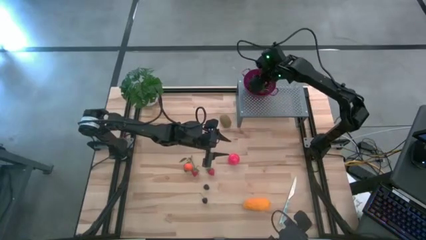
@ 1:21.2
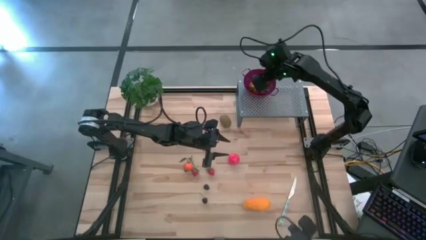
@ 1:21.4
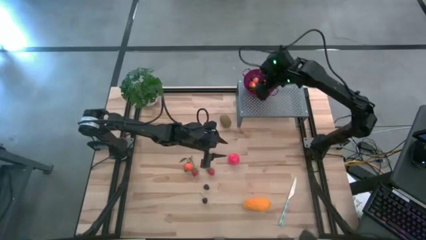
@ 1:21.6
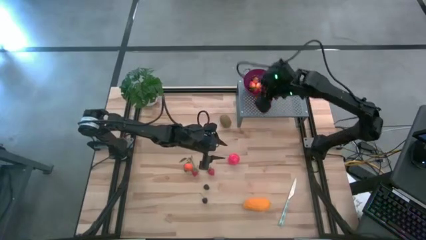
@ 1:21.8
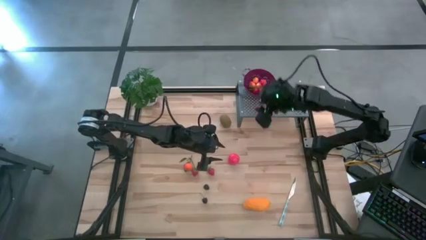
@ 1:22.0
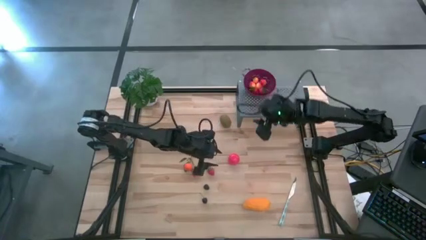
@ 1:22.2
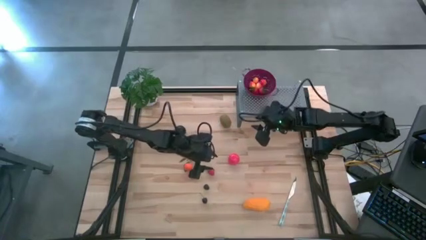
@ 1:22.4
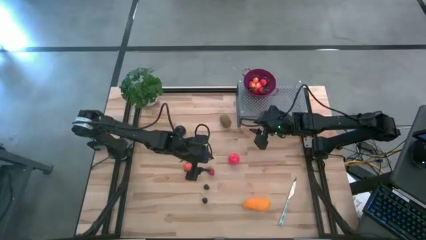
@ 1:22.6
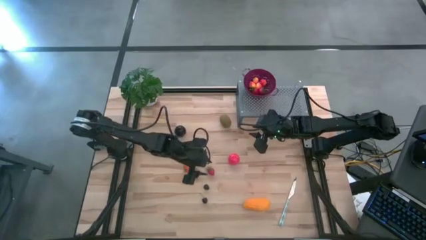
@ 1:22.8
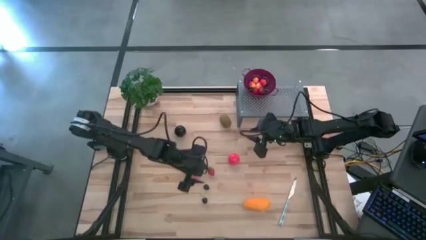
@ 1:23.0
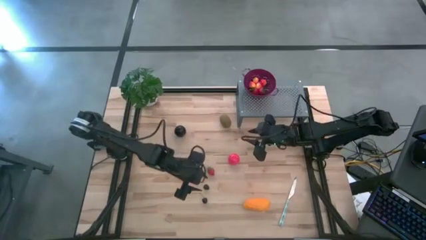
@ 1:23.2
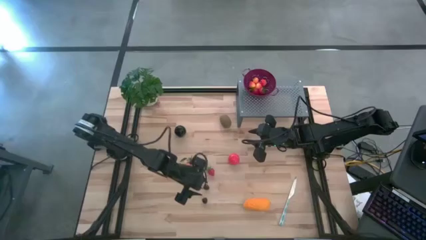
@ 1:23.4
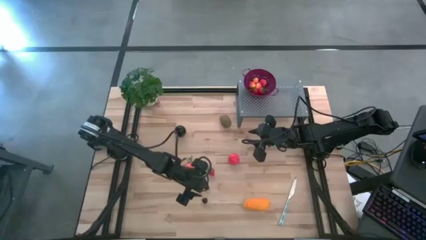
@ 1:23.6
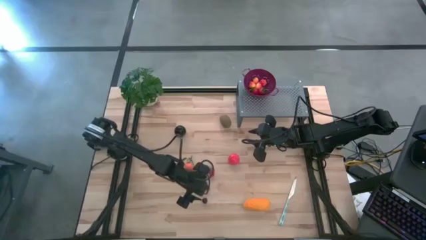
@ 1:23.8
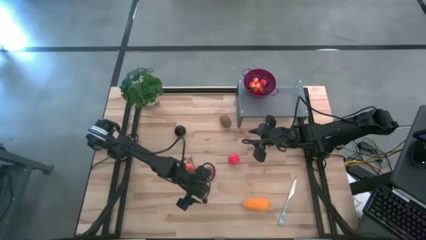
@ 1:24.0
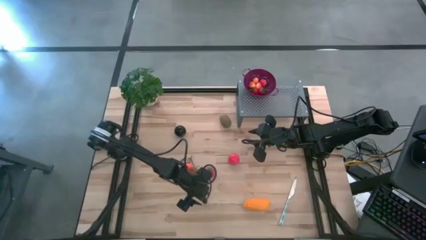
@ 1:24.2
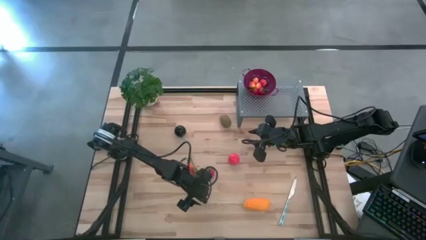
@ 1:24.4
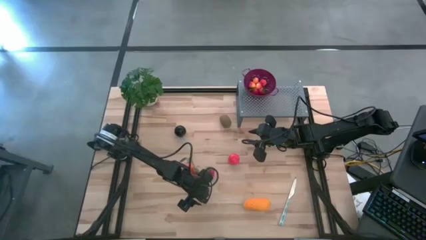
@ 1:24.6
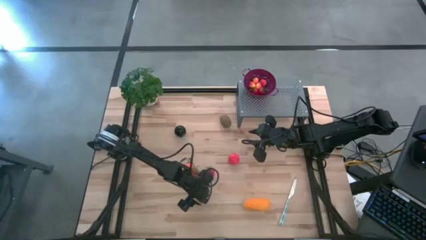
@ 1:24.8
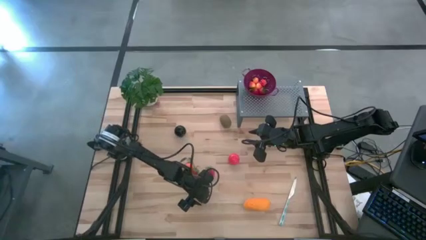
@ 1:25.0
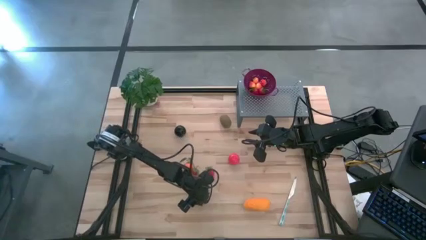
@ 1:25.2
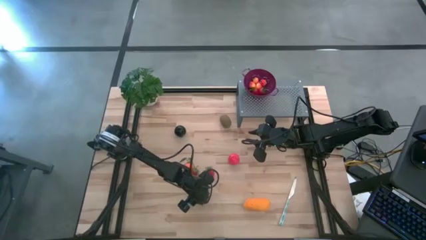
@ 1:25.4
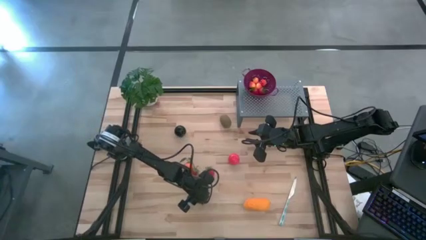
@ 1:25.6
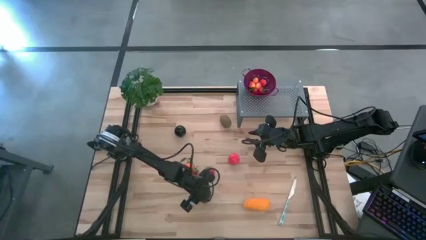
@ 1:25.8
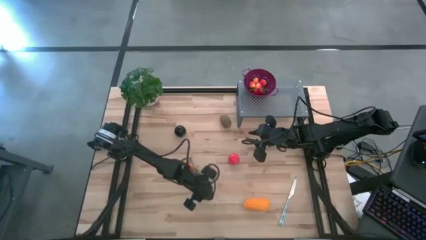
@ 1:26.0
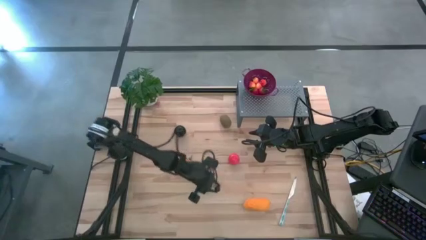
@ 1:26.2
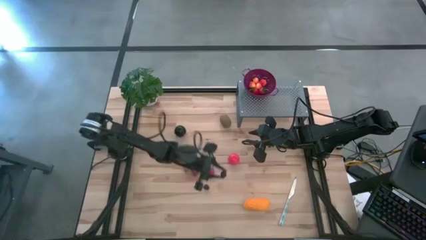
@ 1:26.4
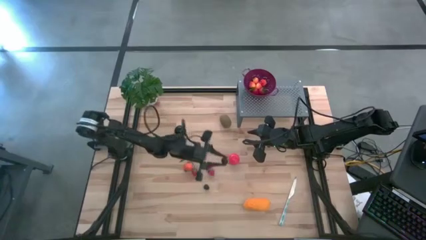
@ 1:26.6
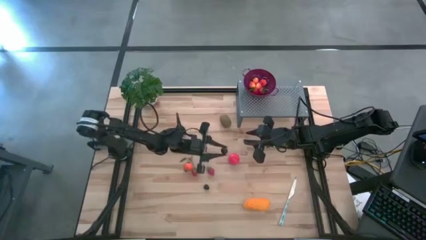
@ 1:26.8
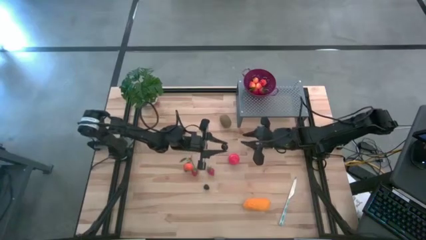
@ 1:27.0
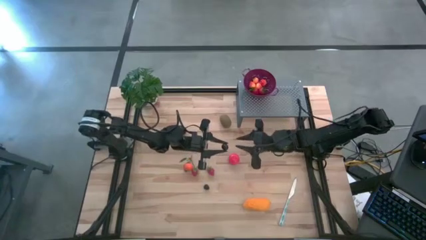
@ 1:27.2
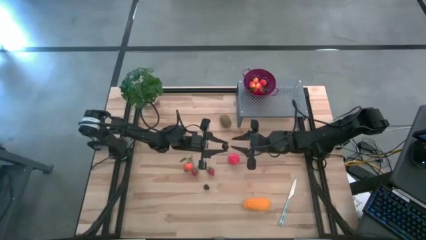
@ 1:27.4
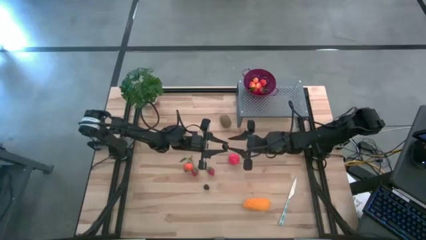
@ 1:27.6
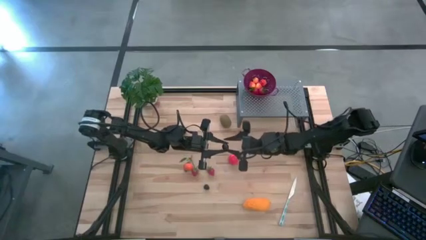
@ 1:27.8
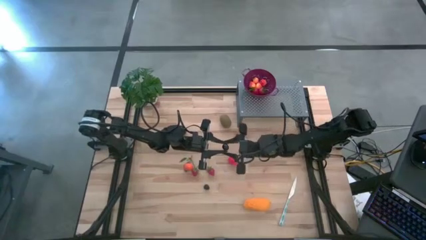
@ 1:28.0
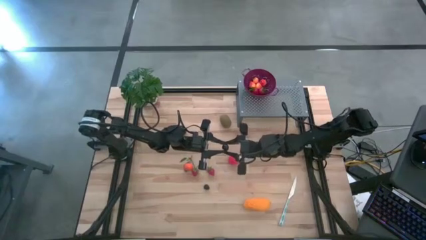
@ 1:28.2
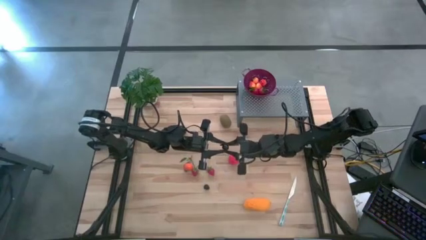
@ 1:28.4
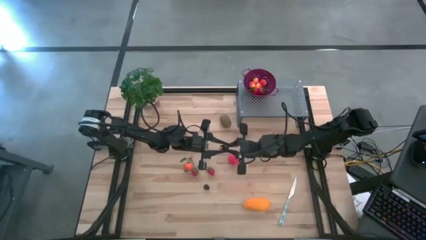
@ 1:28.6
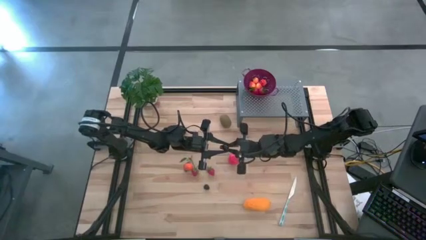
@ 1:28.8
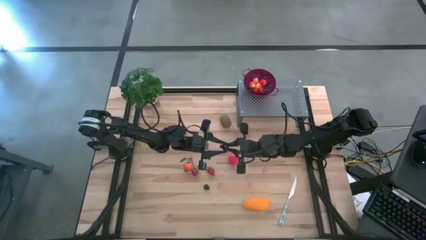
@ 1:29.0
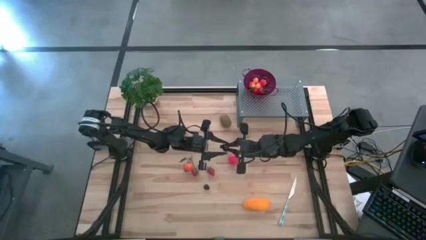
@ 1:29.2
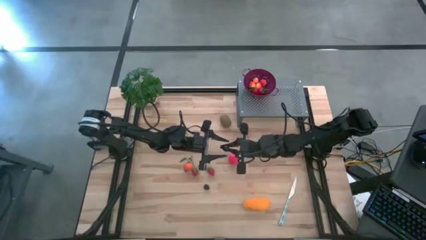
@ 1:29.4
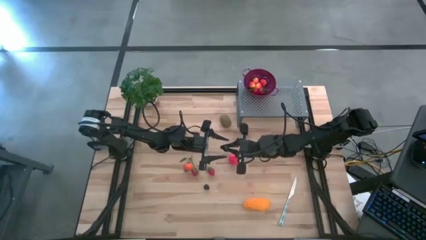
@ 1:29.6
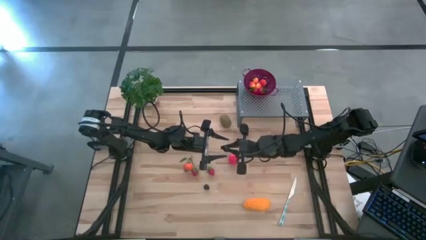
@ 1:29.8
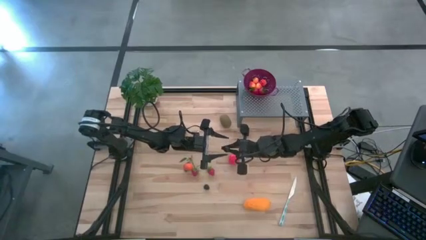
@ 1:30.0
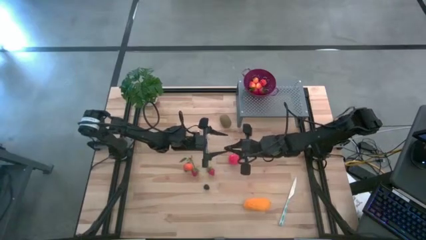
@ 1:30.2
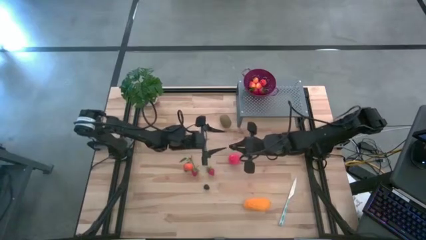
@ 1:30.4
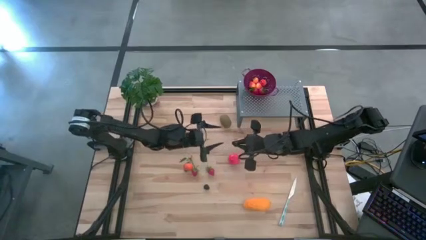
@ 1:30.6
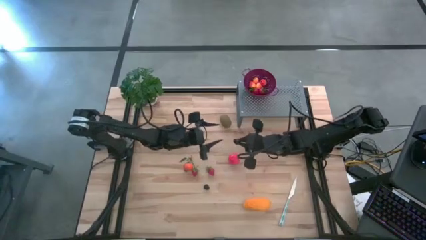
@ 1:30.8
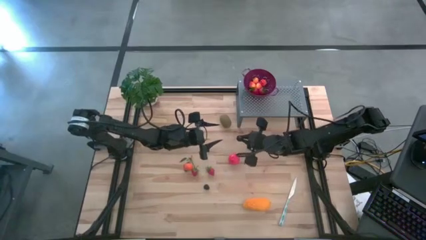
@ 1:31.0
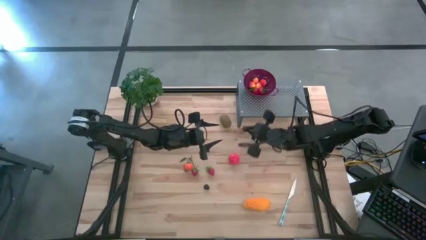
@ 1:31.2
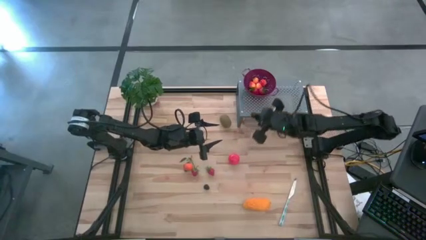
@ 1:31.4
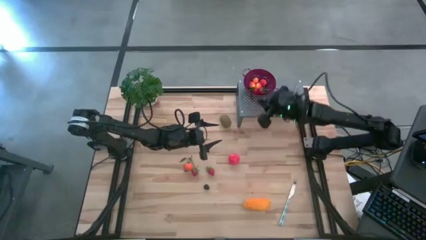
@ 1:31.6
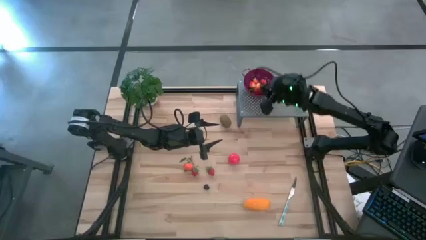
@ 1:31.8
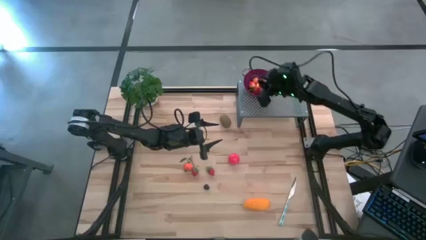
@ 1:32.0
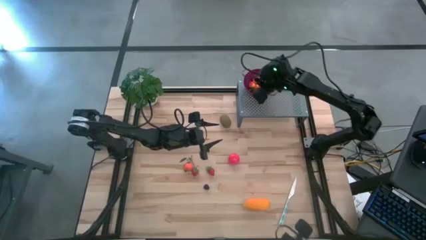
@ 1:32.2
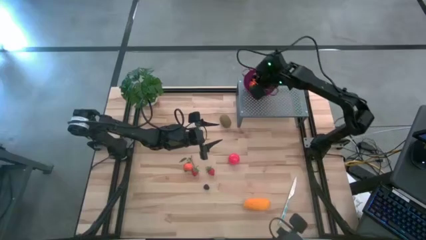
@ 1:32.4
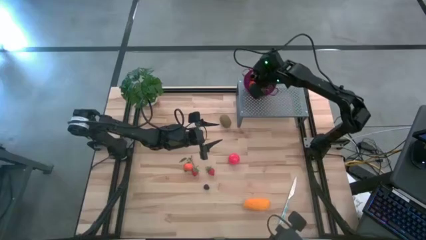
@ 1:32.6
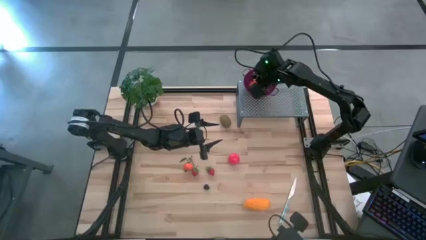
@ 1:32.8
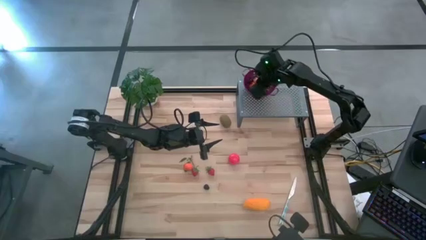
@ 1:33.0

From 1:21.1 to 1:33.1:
Task: Pick & Place Fruit
Put the black berry into the violet strainer bowl on the shelf

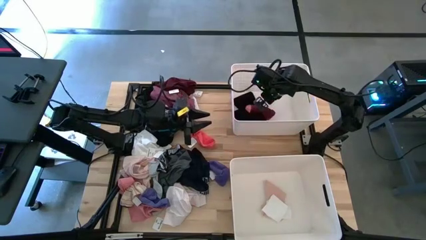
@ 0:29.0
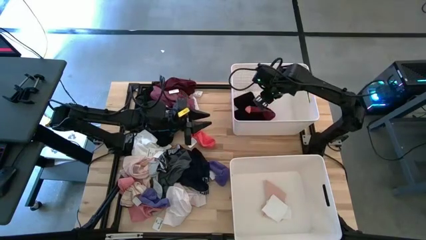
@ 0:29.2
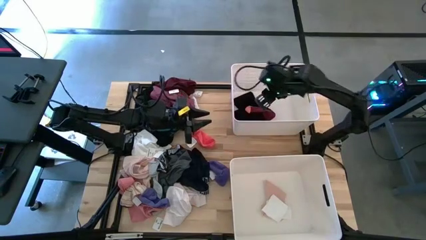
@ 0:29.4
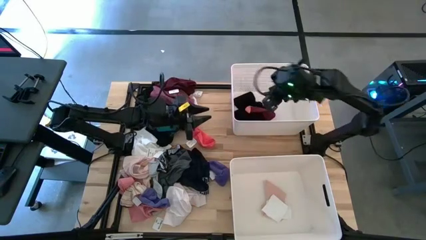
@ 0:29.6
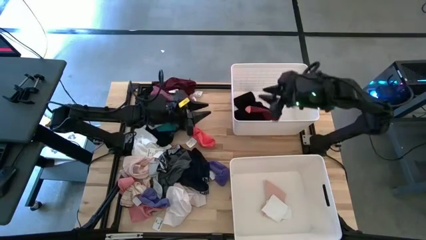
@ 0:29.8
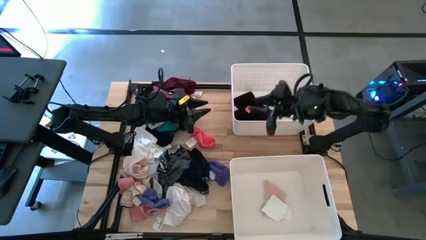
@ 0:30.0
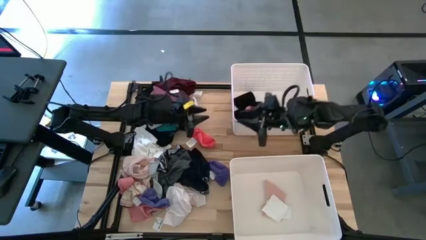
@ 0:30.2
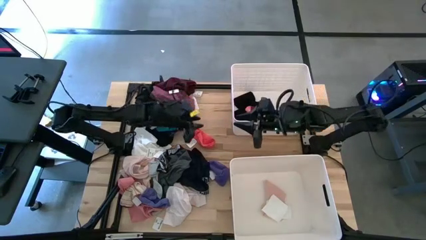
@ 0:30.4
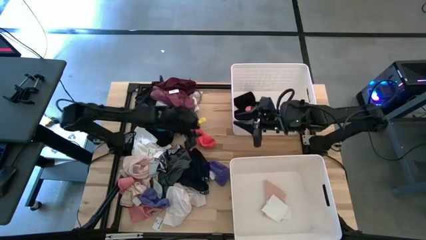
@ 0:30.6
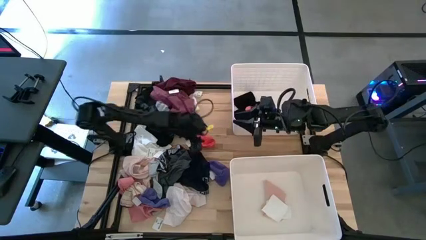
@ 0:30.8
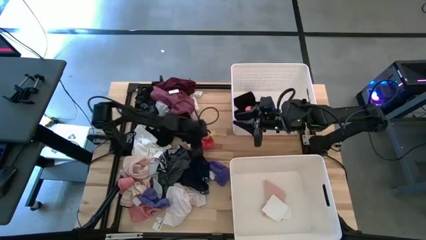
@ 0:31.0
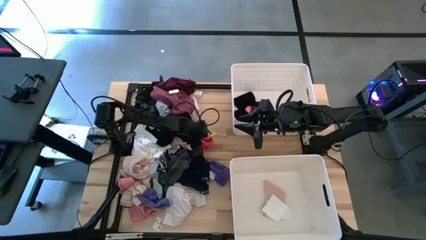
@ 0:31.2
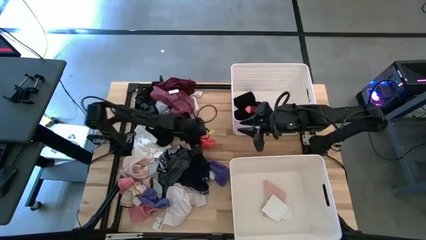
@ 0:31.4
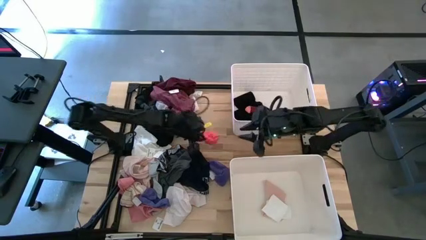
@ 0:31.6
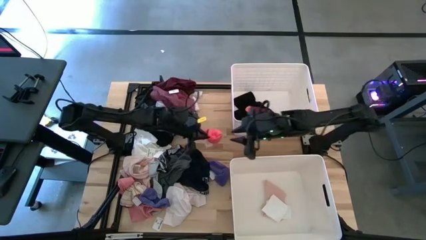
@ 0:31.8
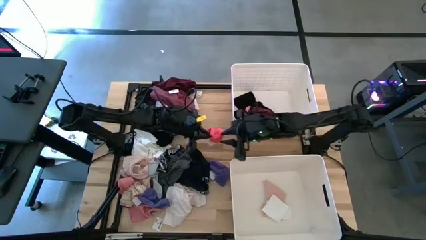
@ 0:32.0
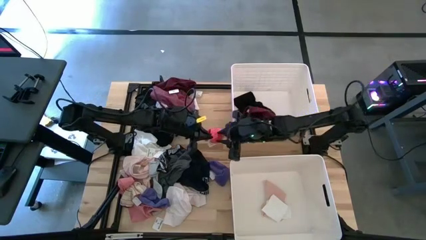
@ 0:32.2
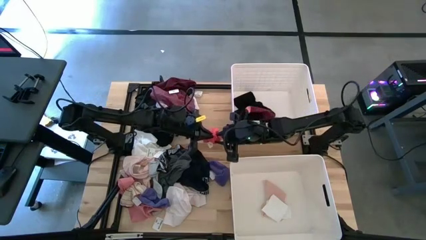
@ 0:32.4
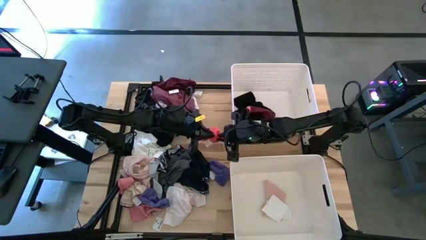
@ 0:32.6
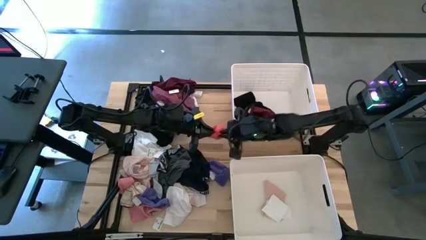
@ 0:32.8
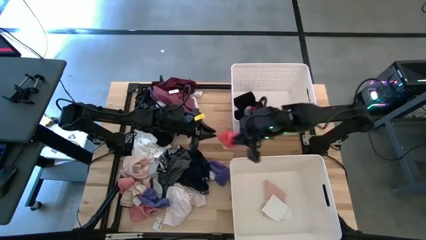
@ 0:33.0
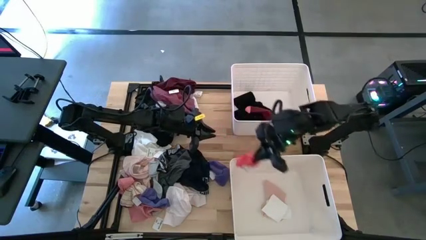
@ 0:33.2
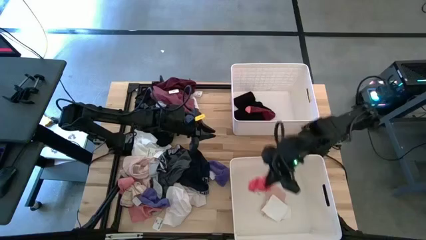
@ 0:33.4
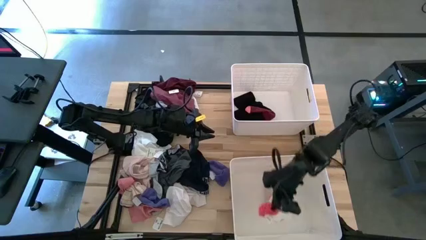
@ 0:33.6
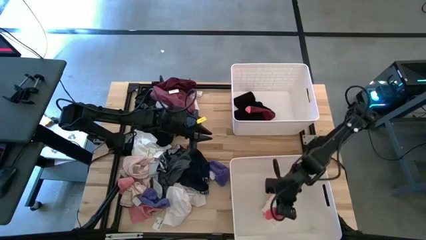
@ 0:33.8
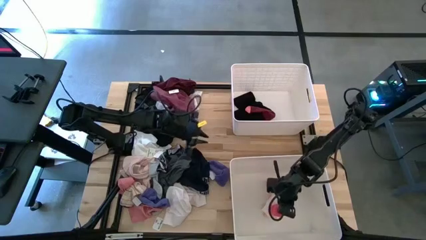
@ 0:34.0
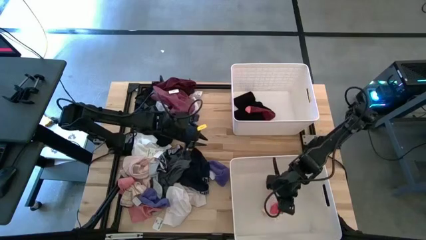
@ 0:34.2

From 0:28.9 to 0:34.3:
Task: Sort clothes
Put the orange sock into the bottom bin
